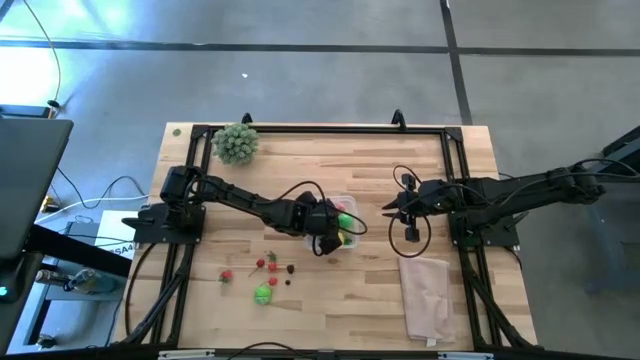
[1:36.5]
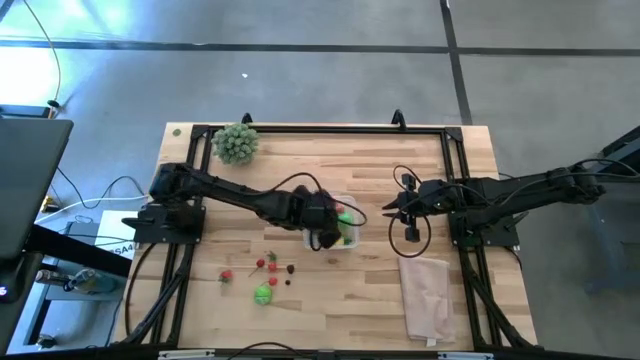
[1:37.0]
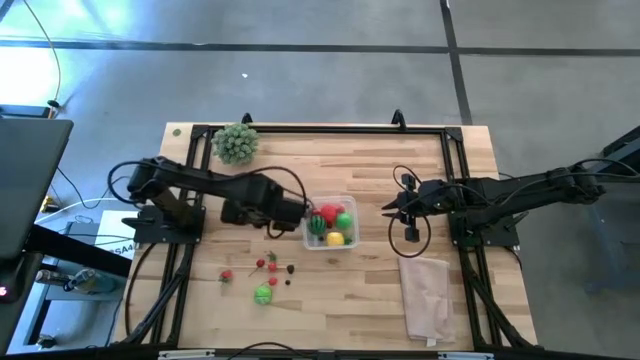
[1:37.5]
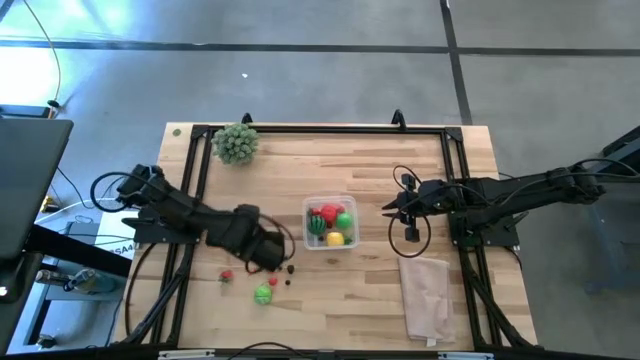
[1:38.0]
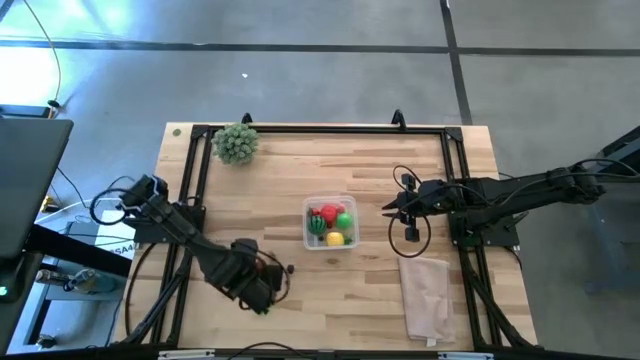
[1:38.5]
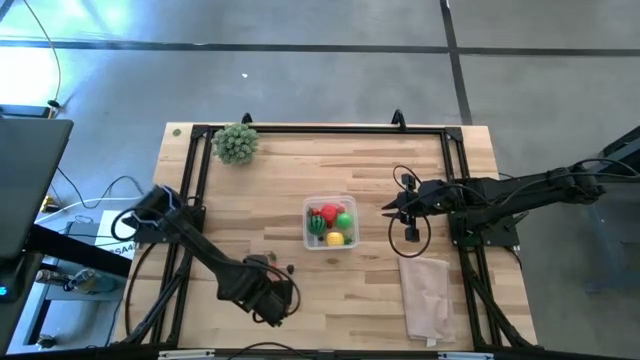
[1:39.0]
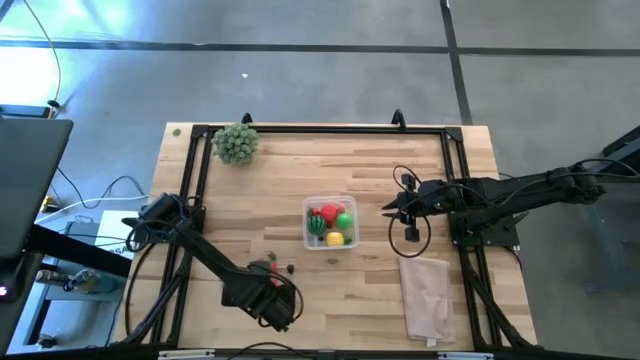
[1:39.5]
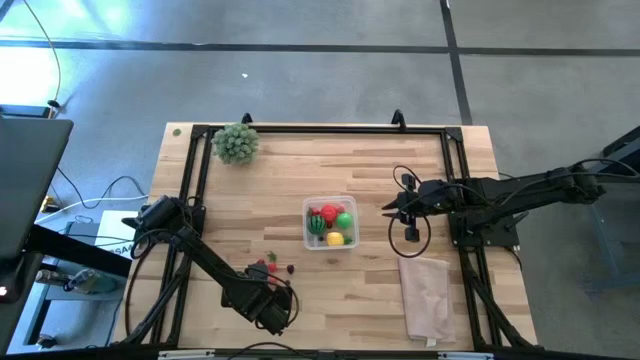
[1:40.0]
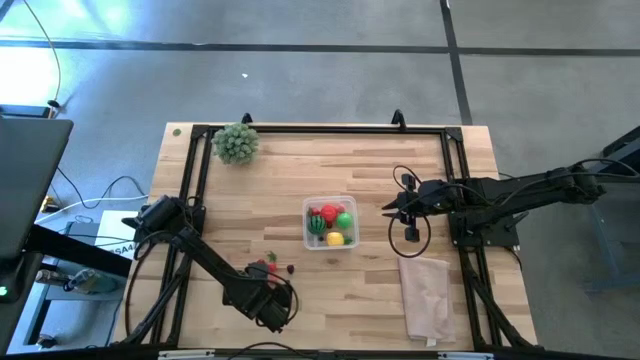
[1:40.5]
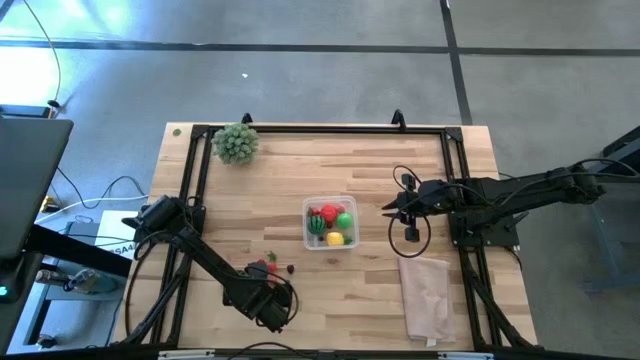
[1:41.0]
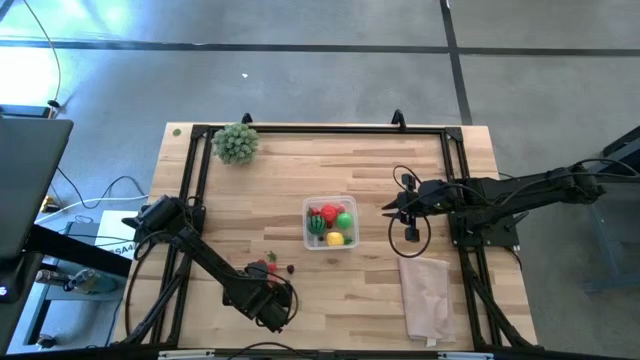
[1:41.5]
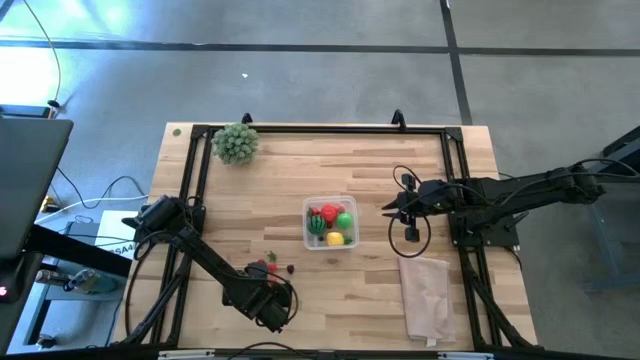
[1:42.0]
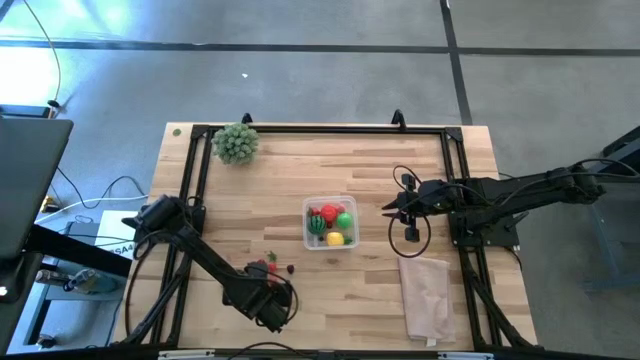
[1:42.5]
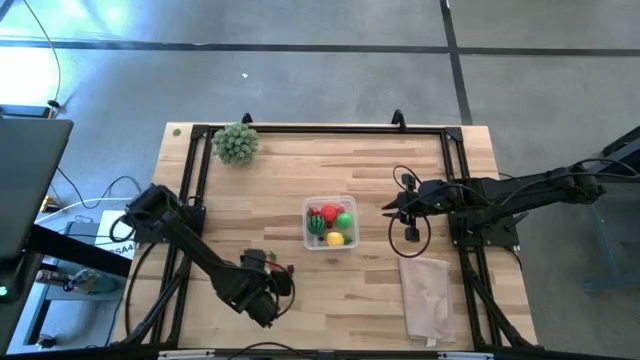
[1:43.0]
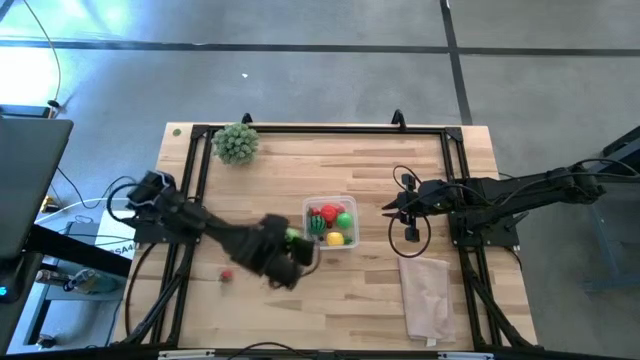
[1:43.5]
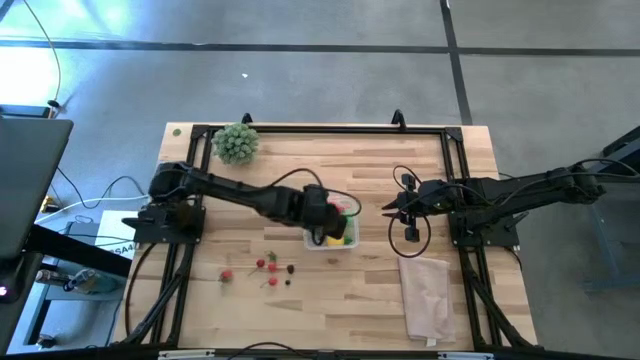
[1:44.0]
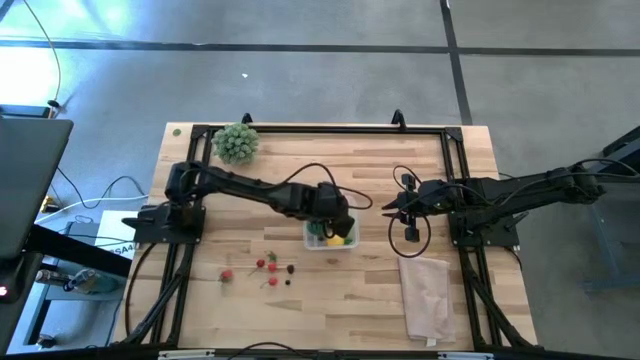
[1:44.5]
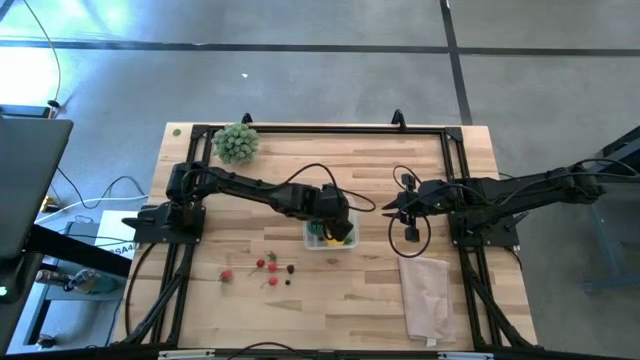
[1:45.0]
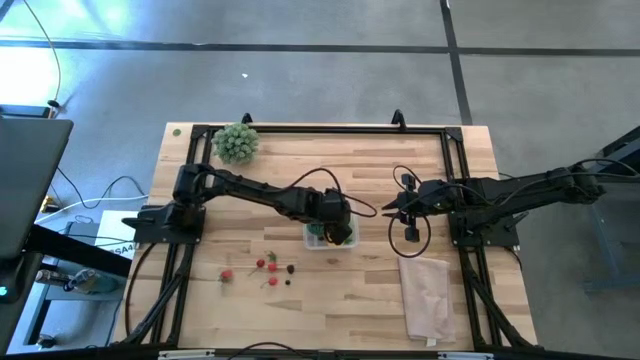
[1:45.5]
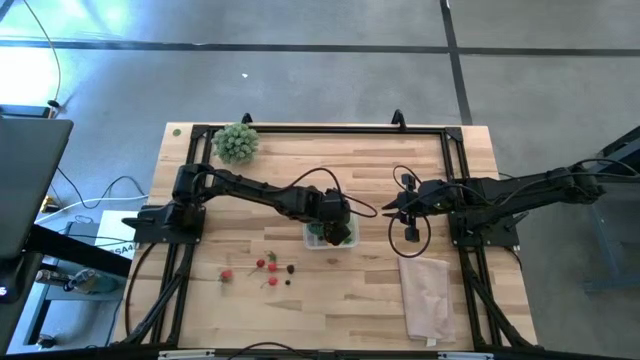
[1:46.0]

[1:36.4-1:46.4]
Task: Pick and placing Produce into tupperware
Put the green cabbage into the transparent bin

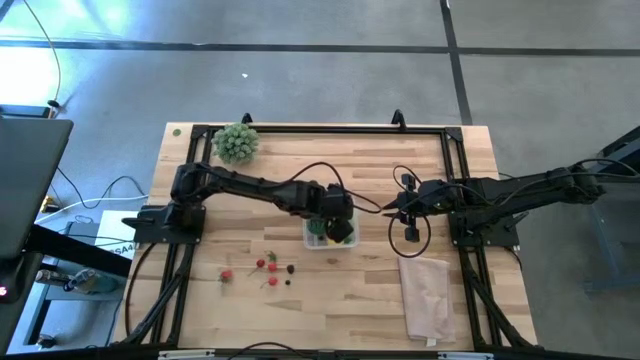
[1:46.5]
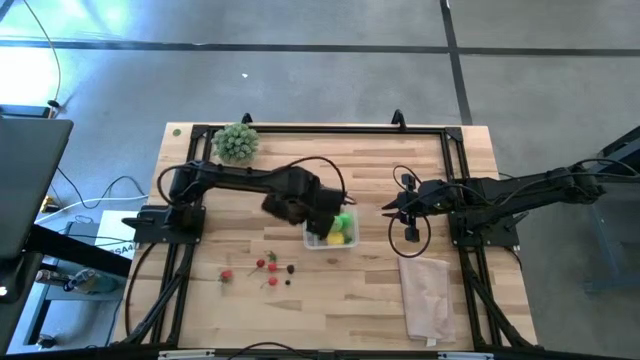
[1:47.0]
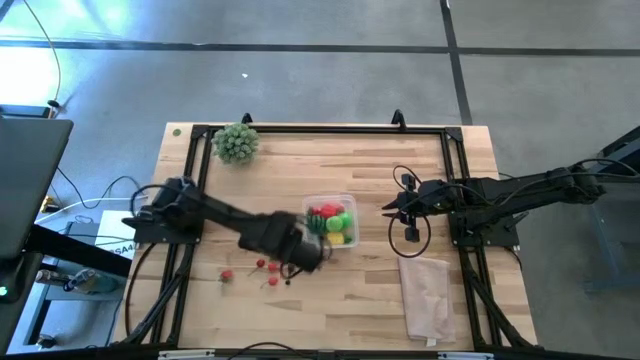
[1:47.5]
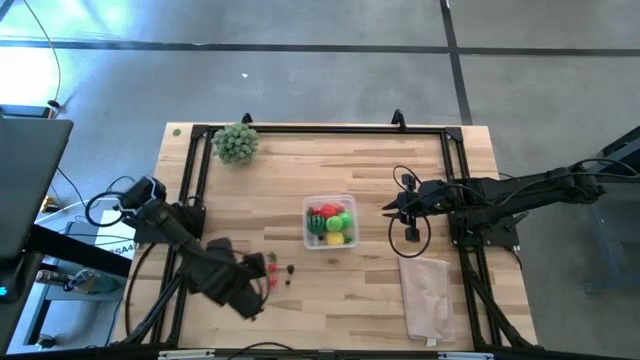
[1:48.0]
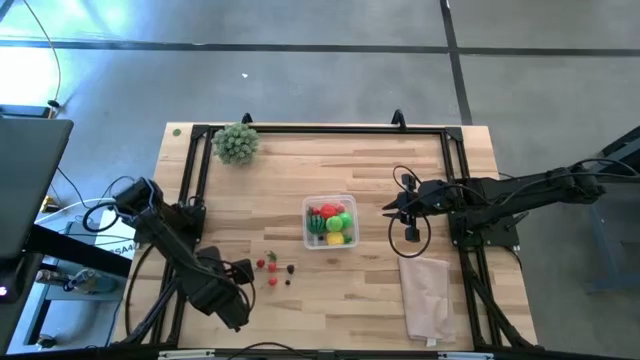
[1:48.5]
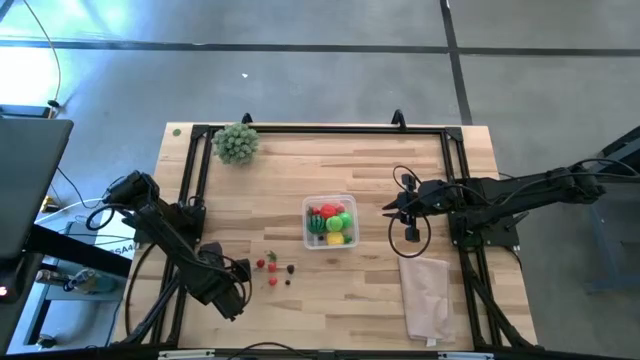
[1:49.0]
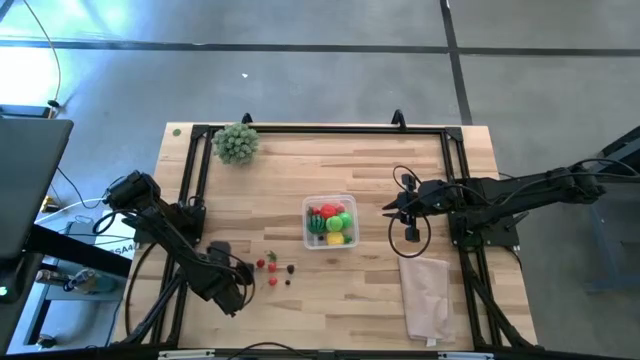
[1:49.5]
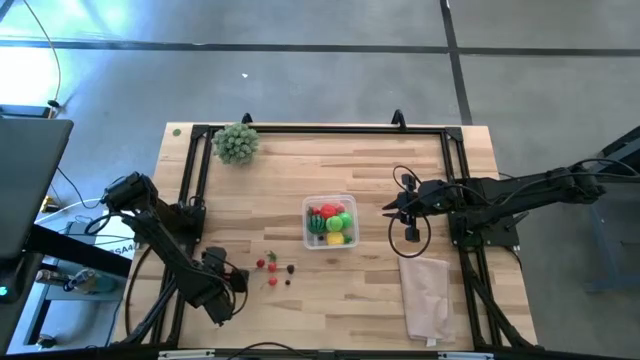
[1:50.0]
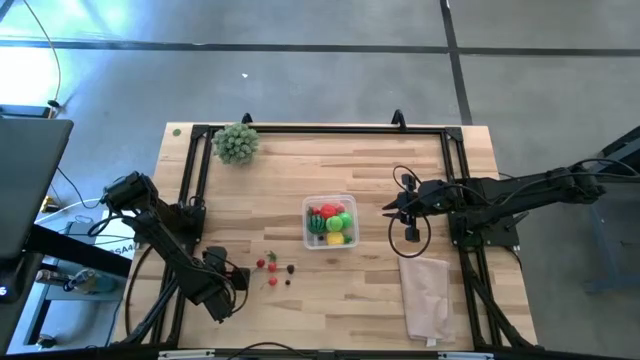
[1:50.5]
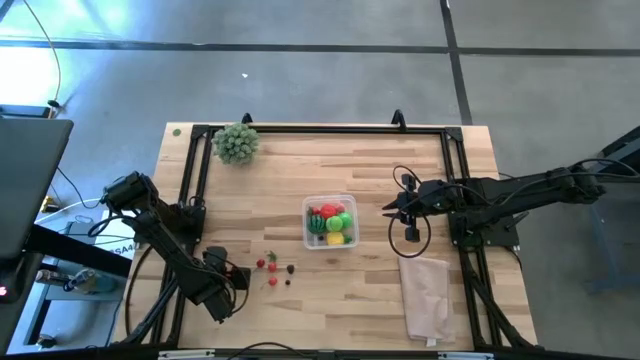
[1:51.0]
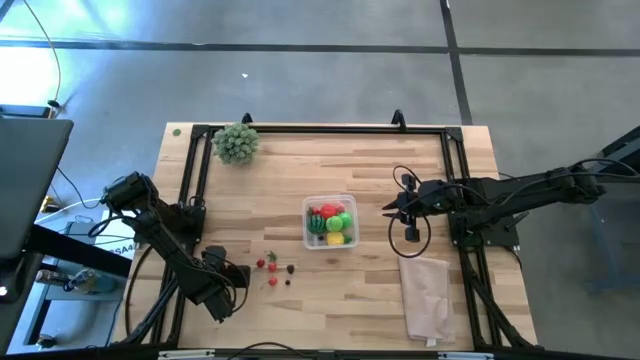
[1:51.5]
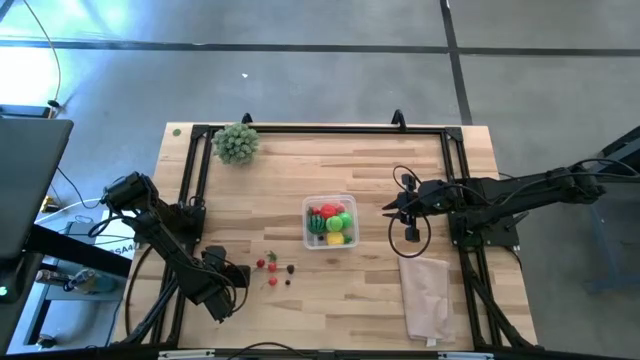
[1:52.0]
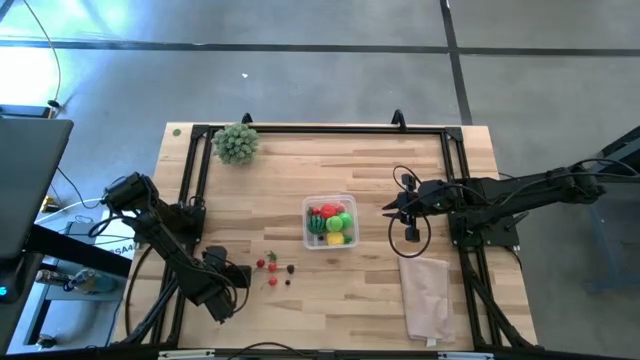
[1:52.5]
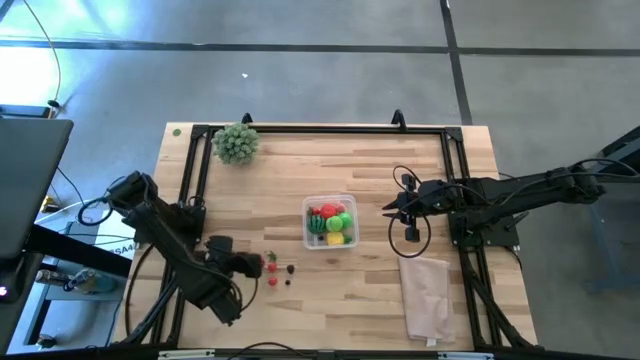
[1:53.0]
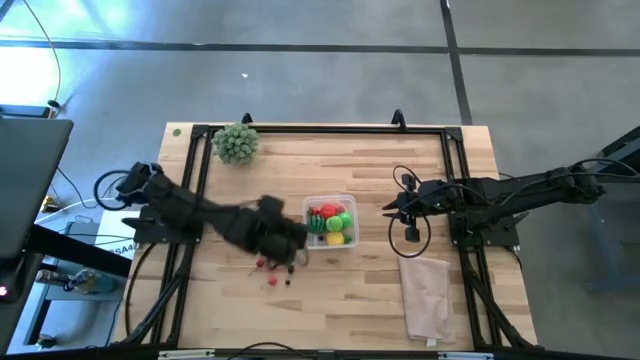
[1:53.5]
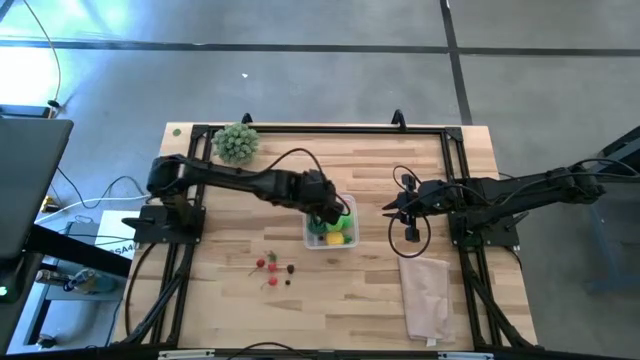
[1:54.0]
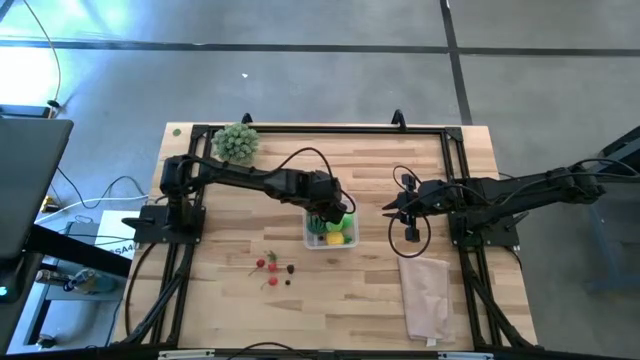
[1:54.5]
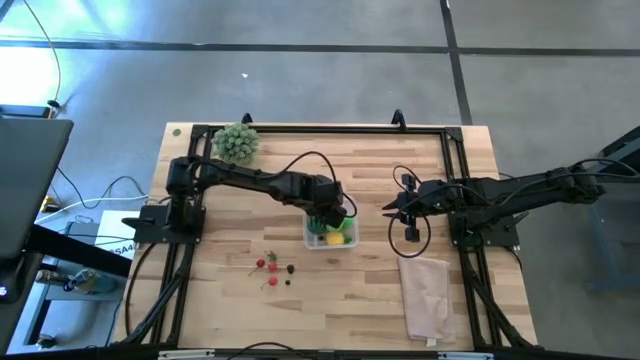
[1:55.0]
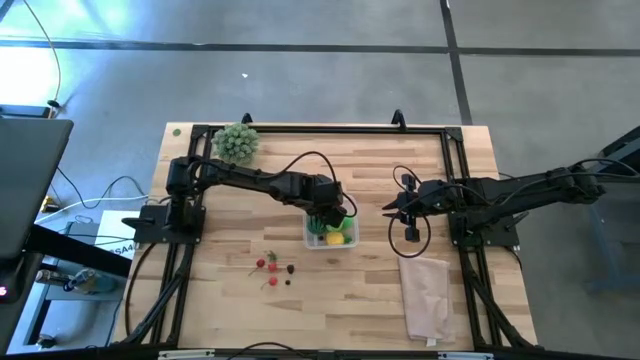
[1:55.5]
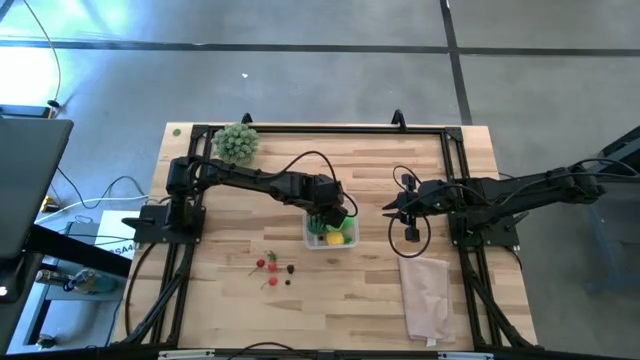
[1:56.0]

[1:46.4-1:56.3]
Put the red strawberry into the transparent bin

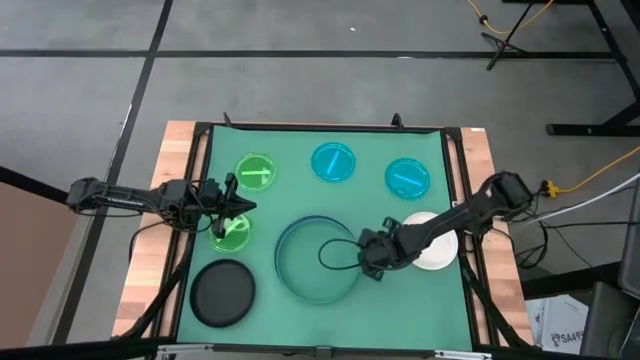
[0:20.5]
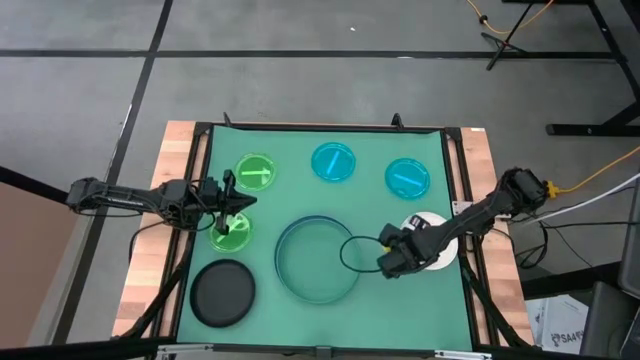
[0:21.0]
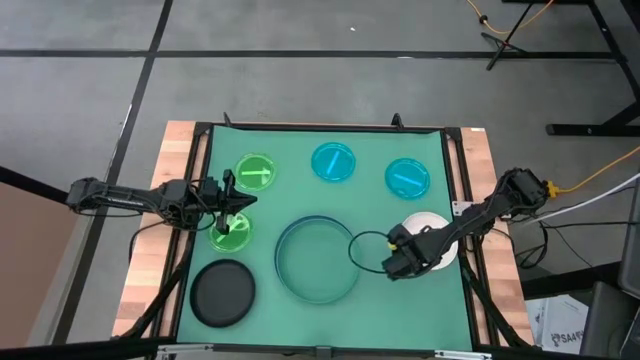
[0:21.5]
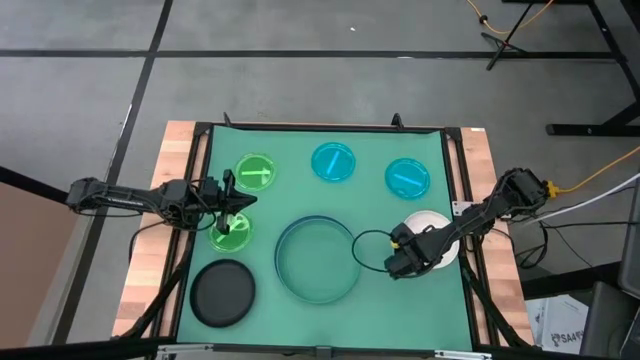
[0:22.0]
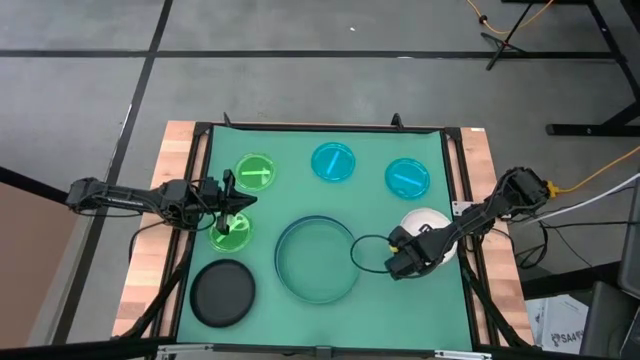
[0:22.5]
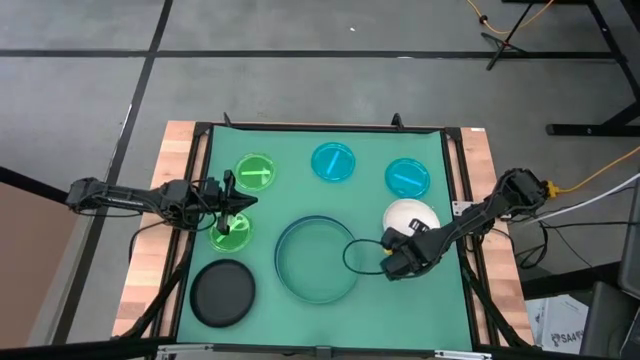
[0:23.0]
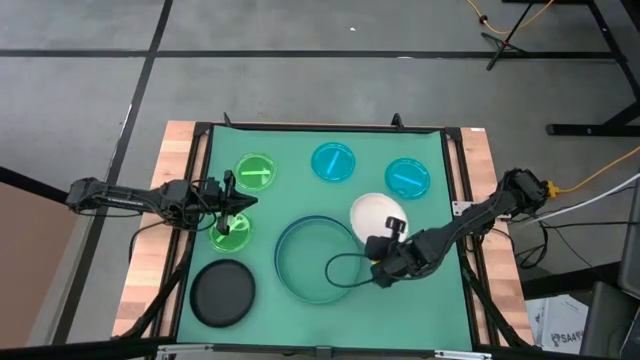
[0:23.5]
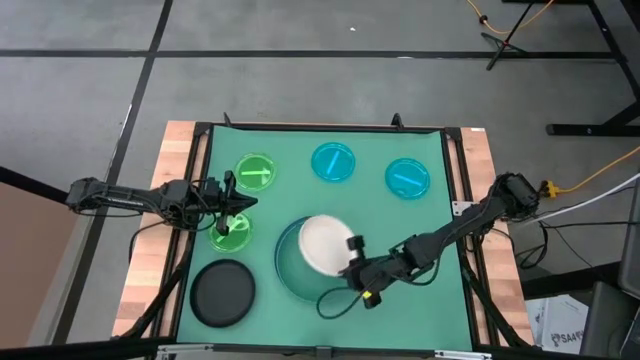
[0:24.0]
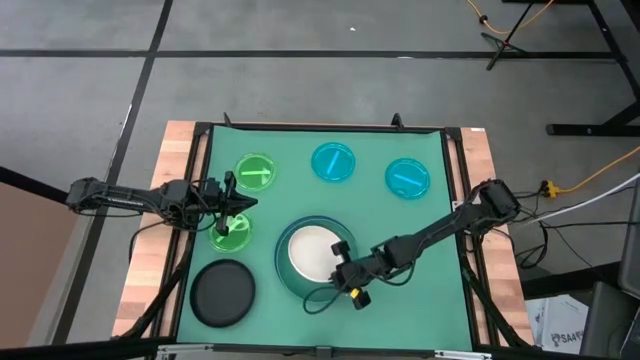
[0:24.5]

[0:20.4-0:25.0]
Task: Stack plastic plates
Stack the pink plate on the green plate
